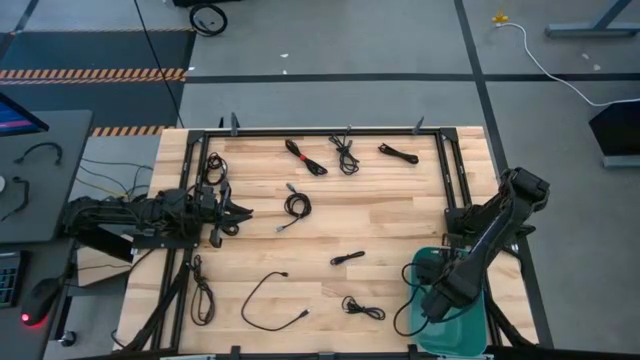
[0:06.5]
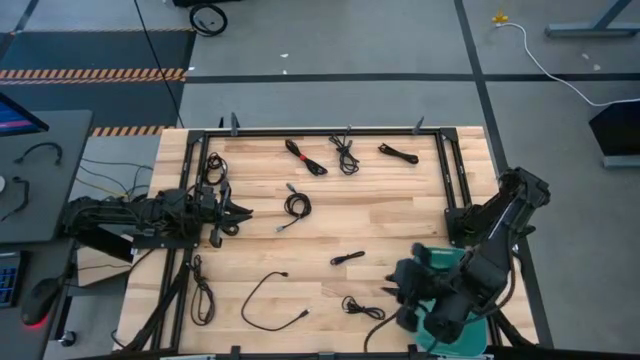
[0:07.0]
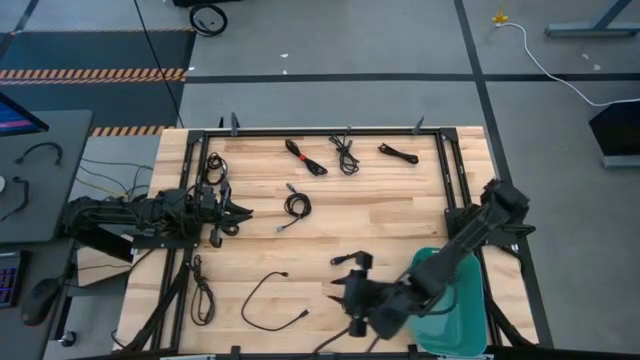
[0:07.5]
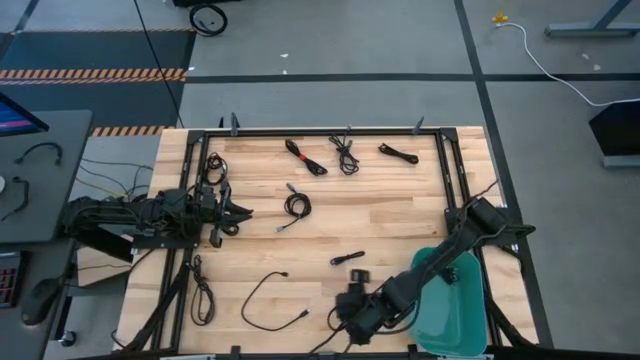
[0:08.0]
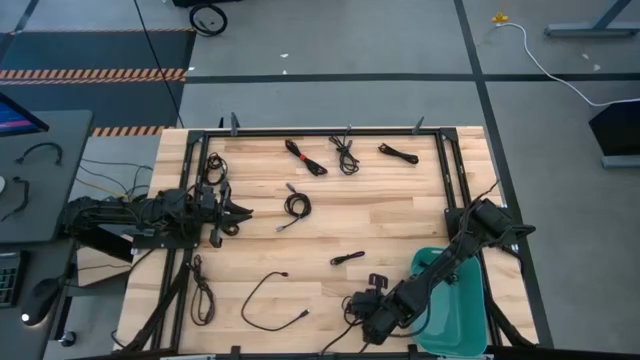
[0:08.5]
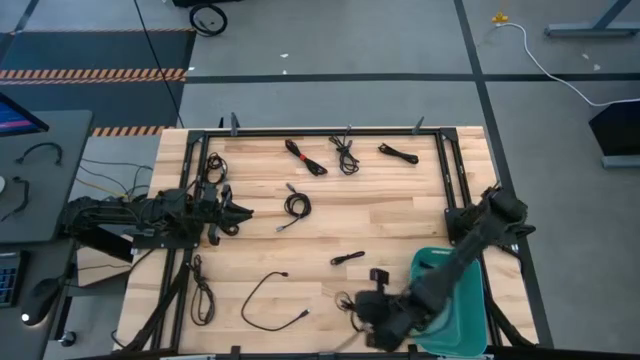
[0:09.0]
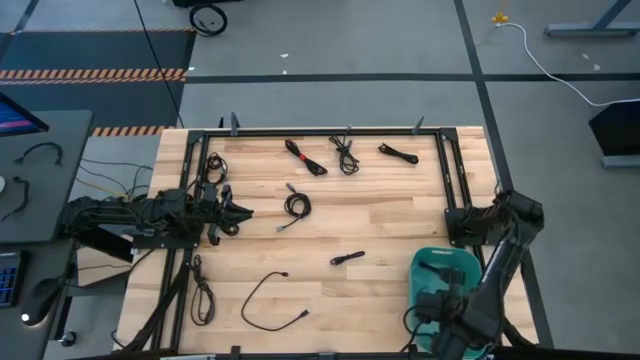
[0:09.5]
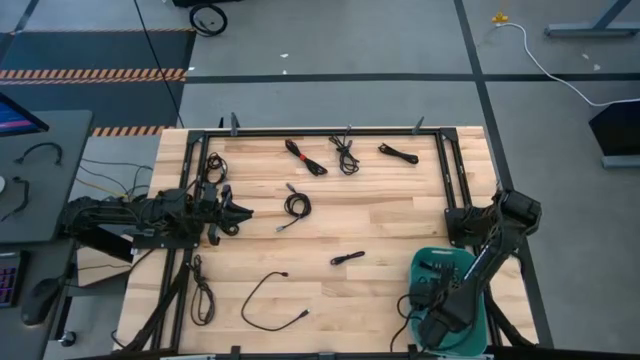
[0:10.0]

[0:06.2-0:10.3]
Task: Pick and place USB-C Cables
Put the black charger cable into the blue bin

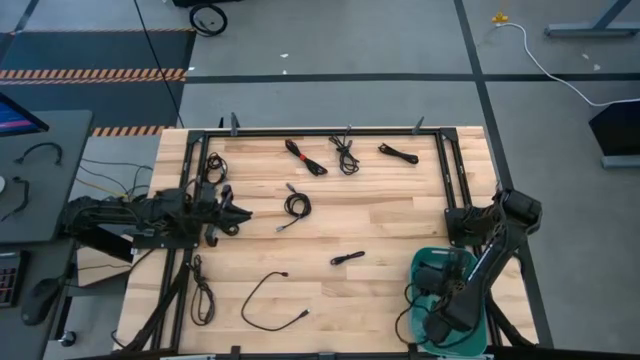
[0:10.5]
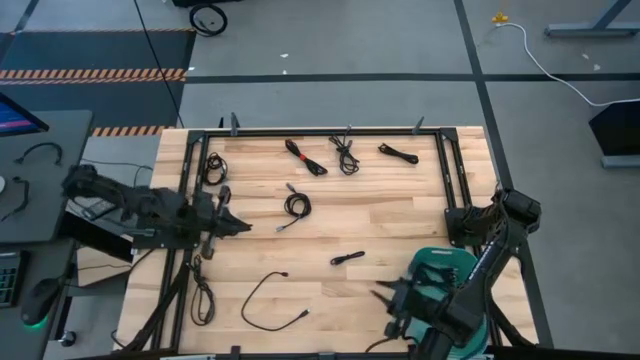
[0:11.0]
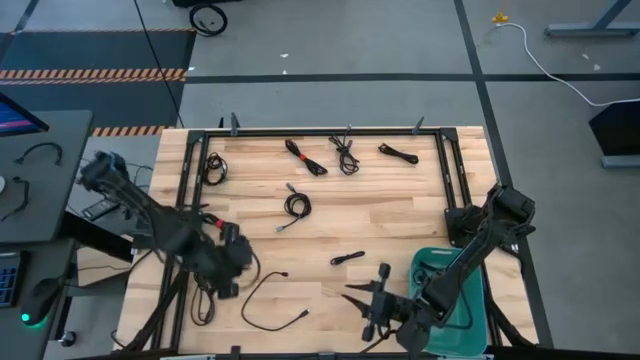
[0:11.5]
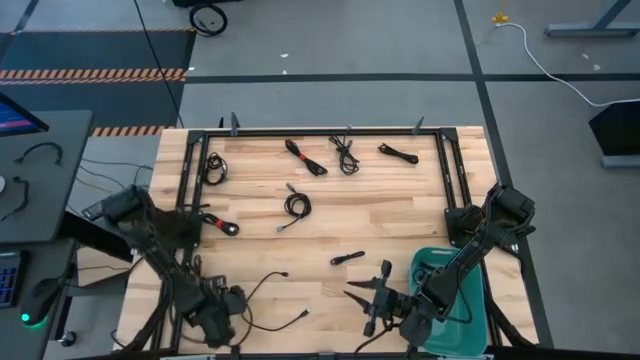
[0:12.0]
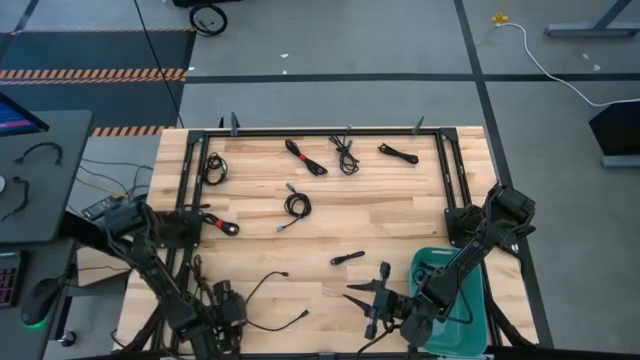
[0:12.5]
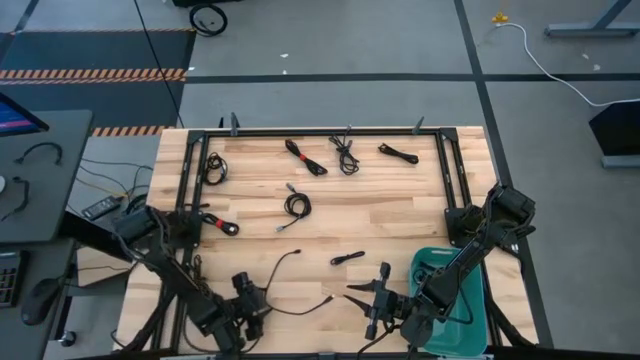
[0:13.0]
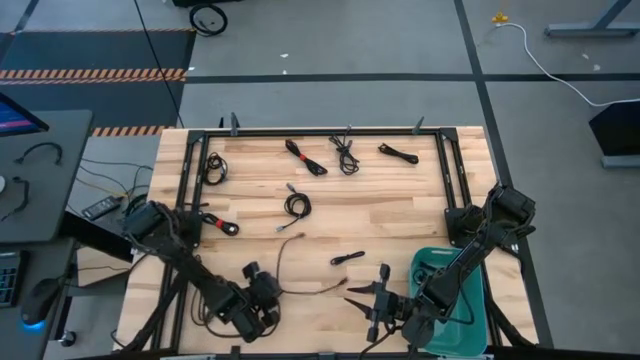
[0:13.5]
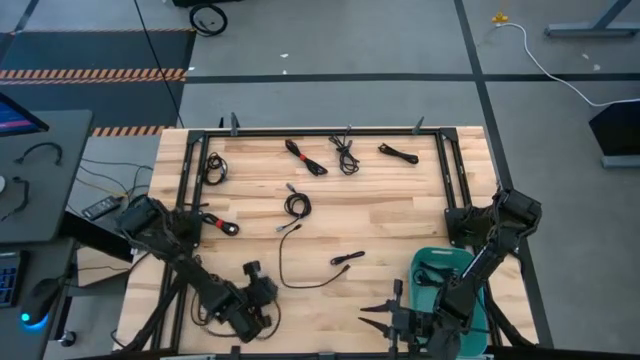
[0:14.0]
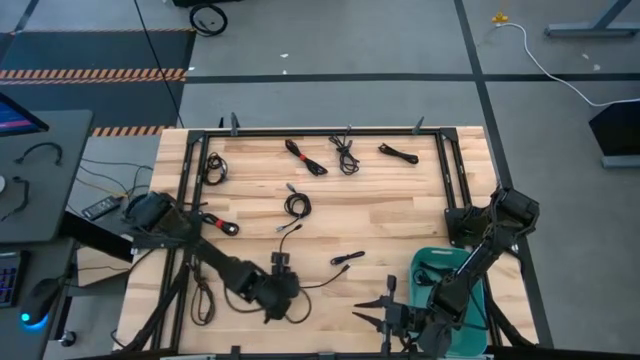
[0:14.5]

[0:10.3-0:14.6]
Put the black charger cable into the blue bin

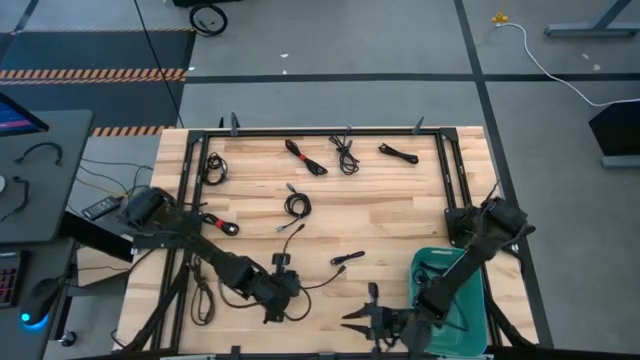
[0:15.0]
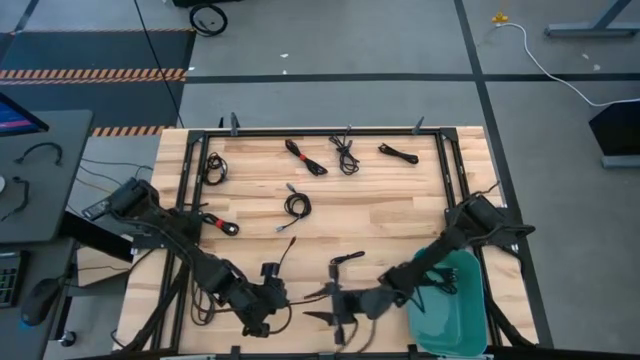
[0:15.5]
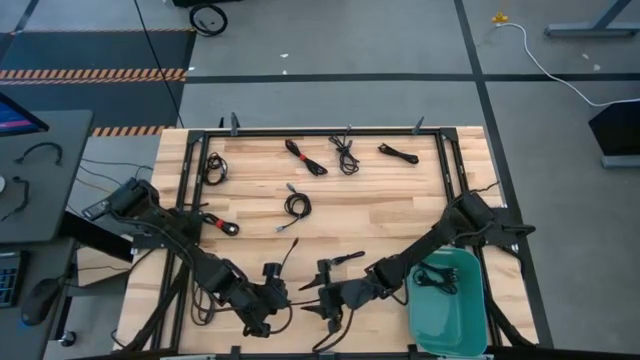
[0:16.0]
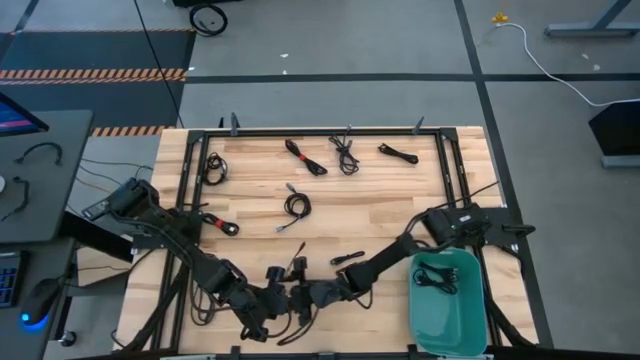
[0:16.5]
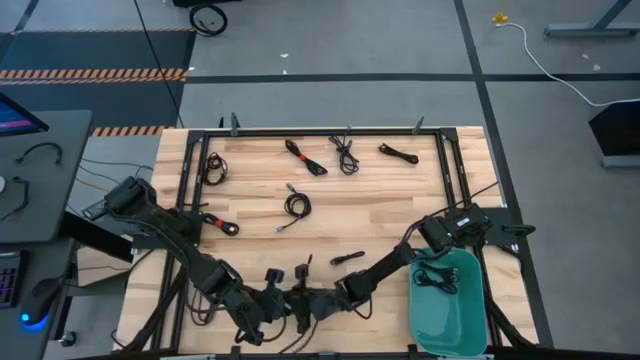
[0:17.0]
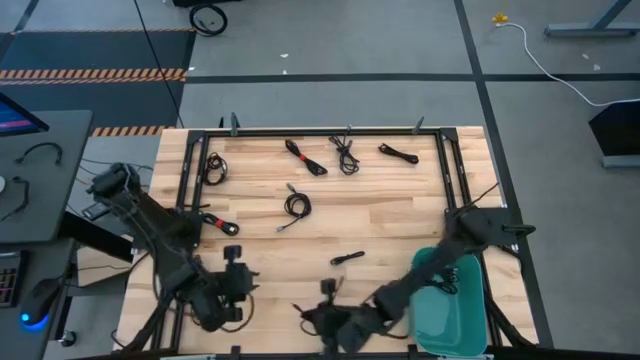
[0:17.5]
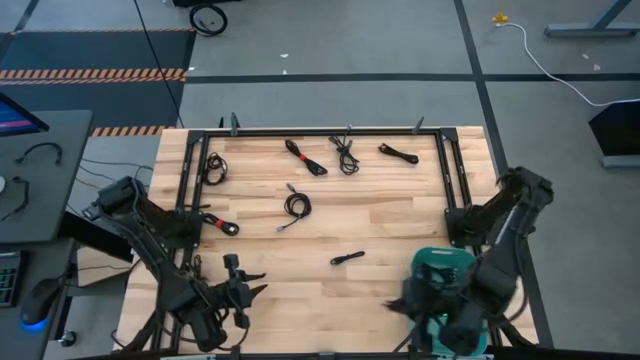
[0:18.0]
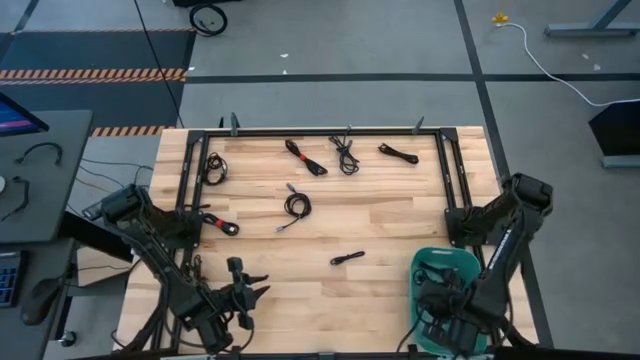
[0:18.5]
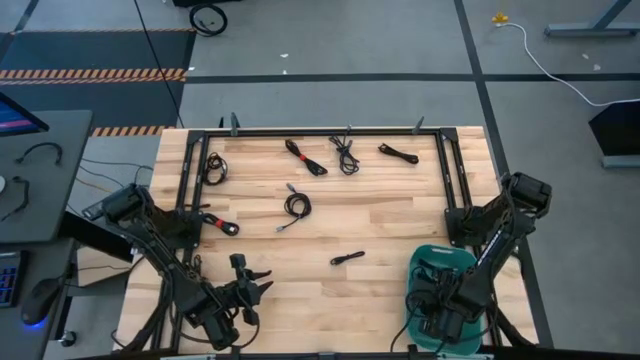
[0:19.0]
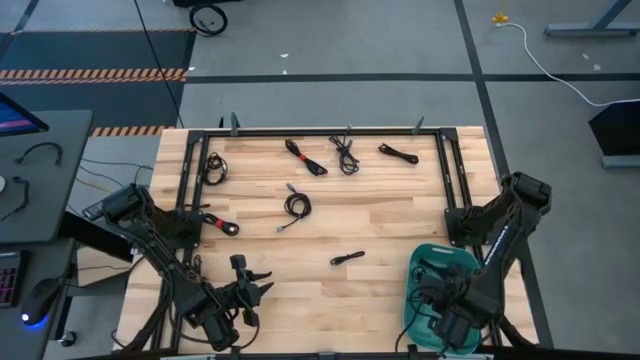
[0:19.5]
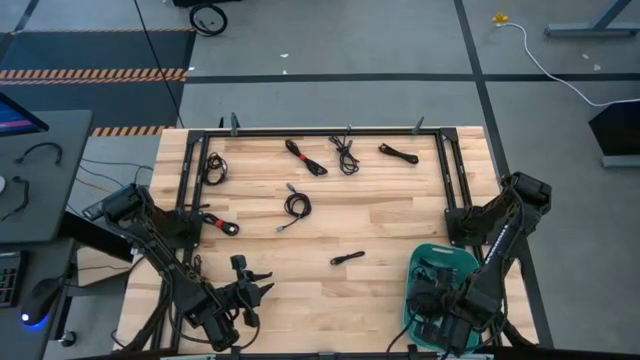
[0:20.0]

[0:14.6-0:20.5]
Put the black charger cable into the blue bin

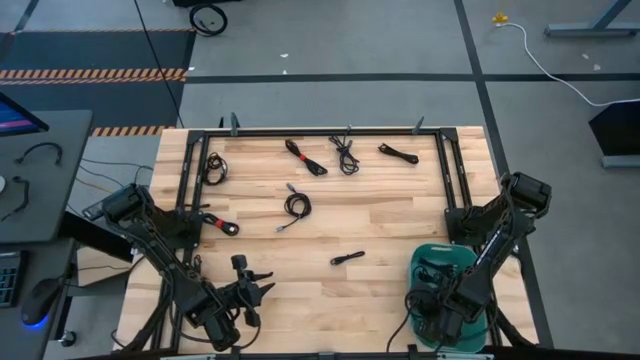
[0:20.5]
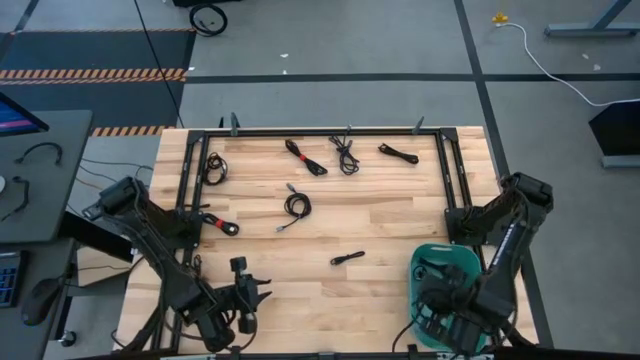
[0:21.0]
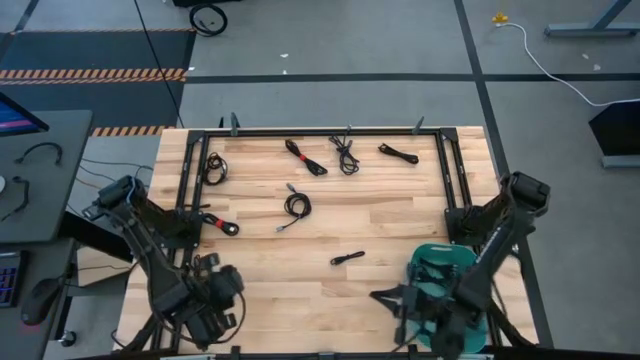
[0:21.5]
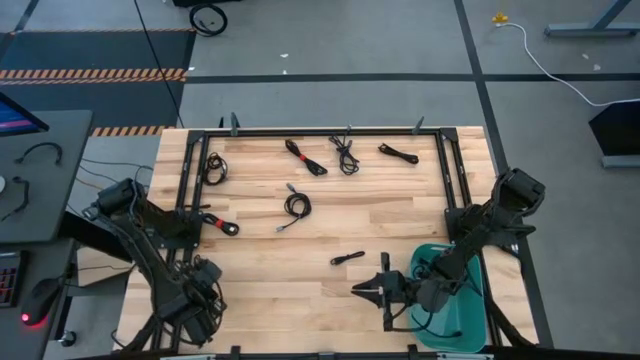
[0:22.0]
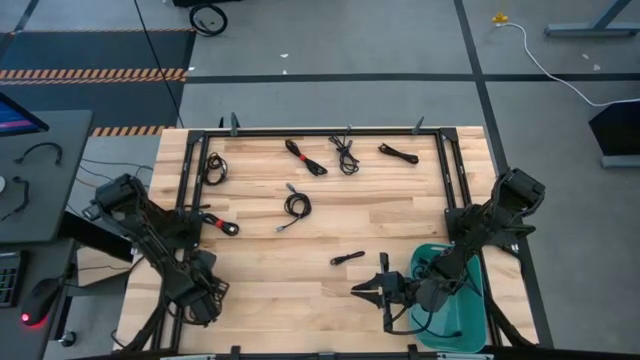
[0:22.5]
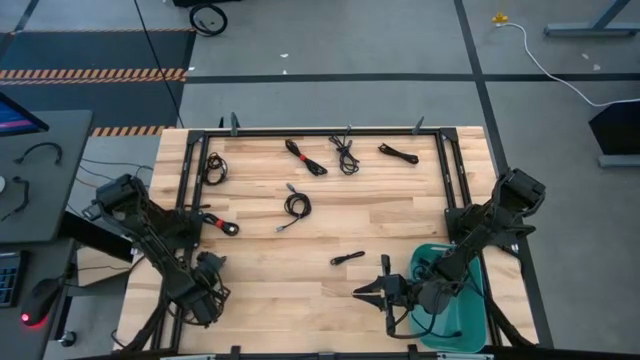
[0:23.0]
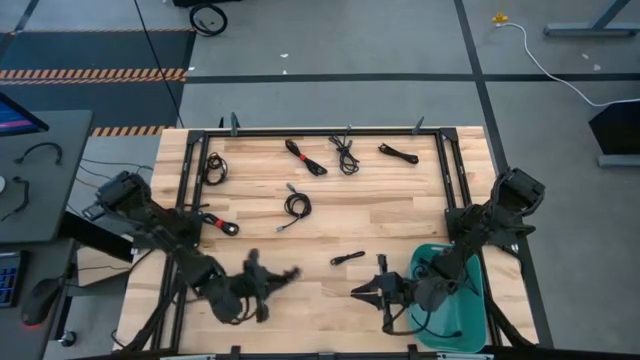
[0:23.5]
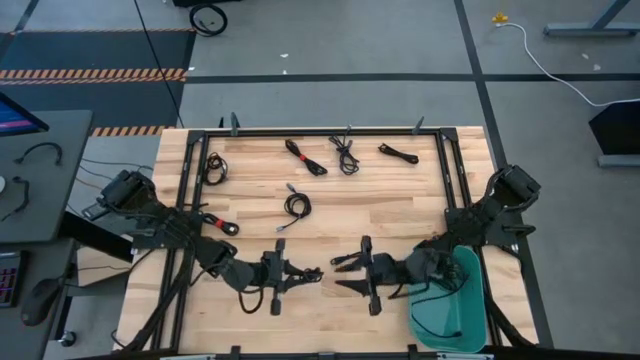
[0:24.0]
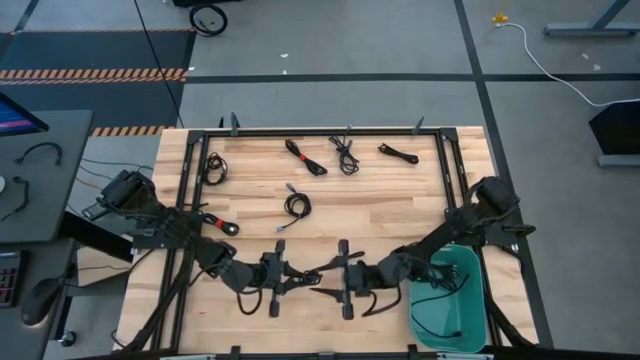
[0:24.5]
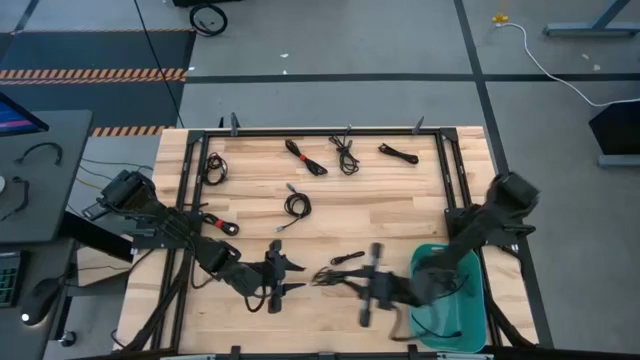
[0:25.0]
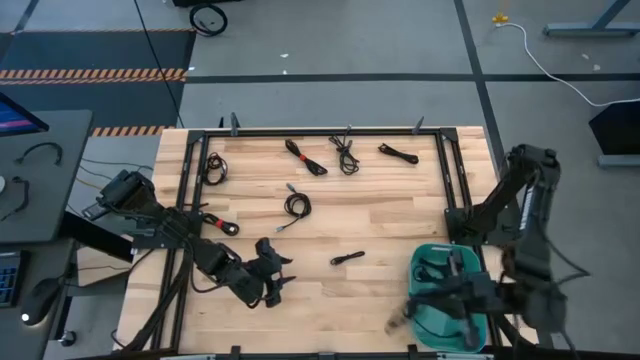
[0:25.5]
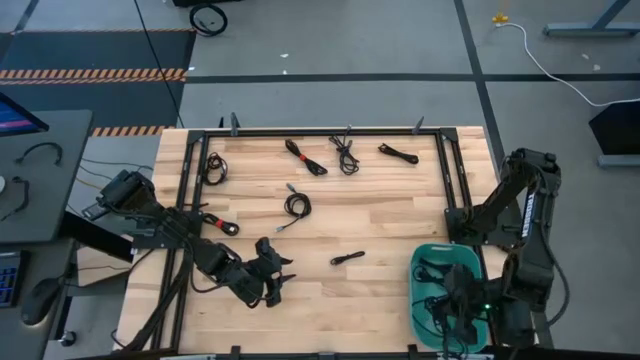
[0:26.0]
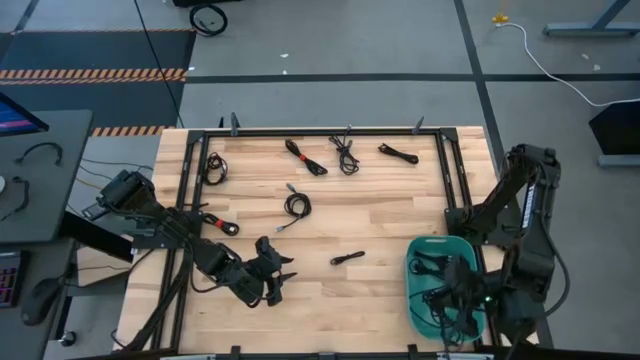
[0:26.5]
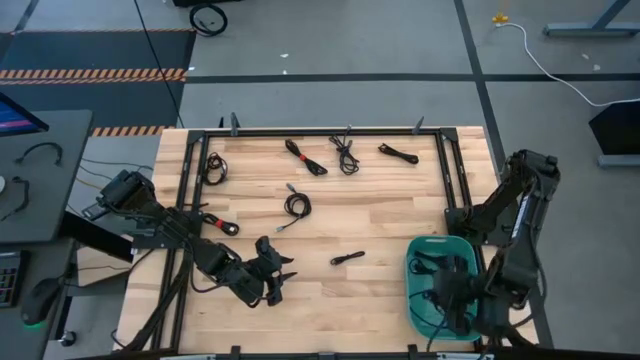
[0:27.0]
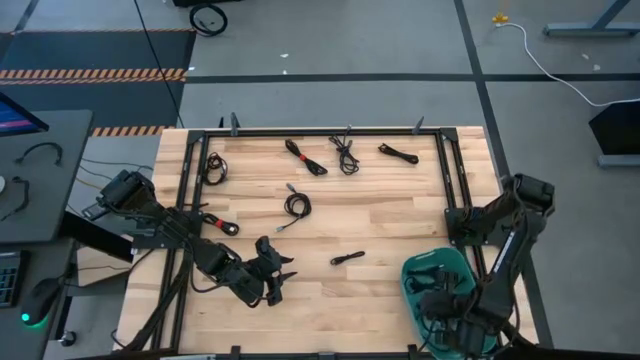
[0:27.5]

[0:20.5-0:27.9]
Put the black charger cable into the blue bin
